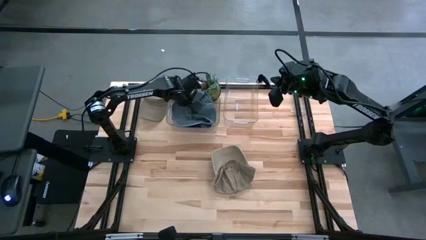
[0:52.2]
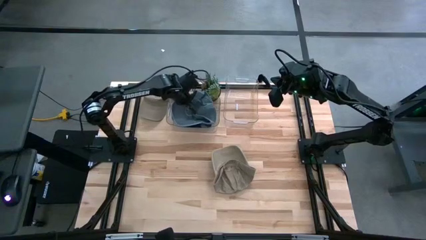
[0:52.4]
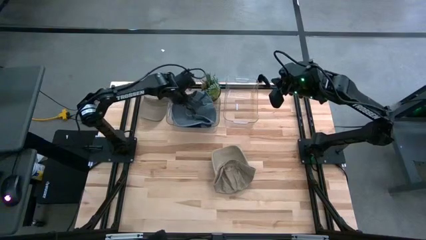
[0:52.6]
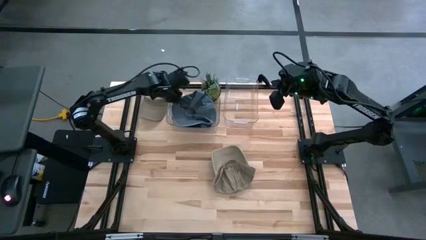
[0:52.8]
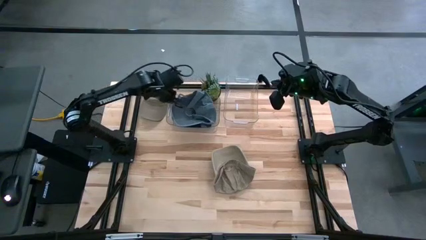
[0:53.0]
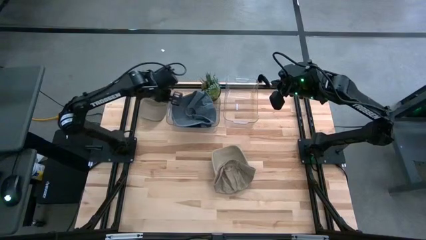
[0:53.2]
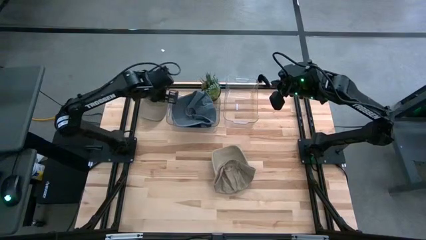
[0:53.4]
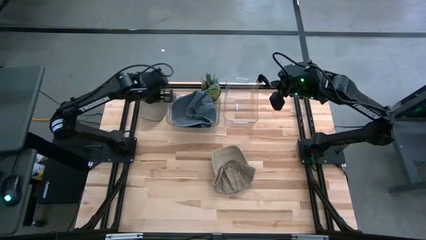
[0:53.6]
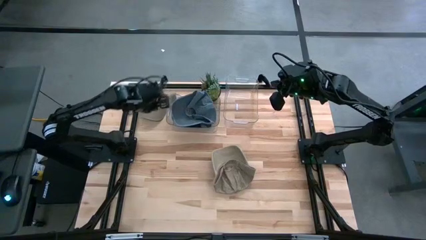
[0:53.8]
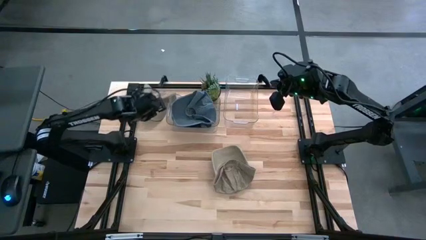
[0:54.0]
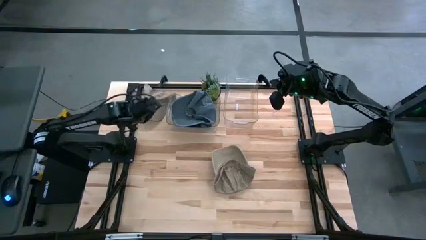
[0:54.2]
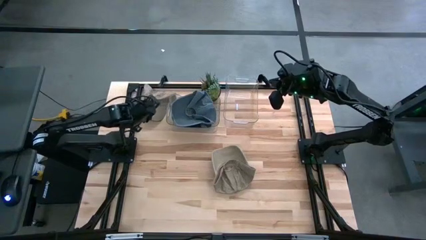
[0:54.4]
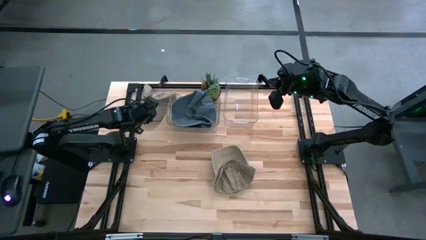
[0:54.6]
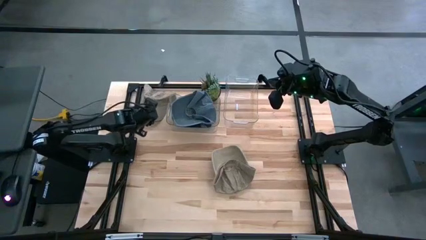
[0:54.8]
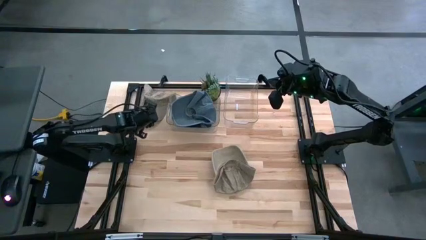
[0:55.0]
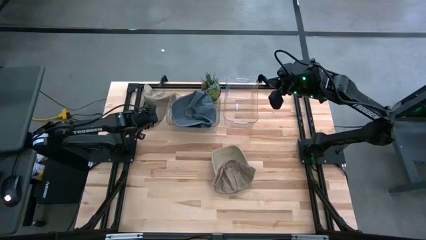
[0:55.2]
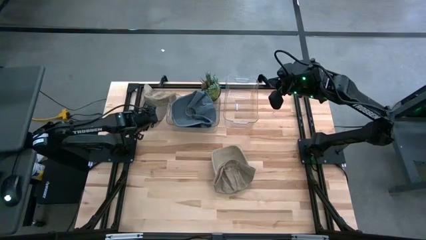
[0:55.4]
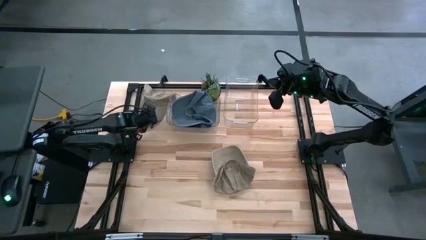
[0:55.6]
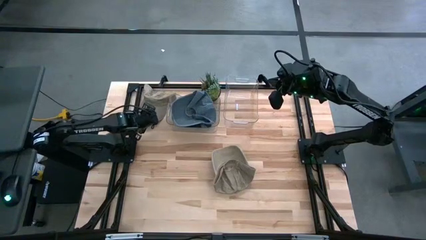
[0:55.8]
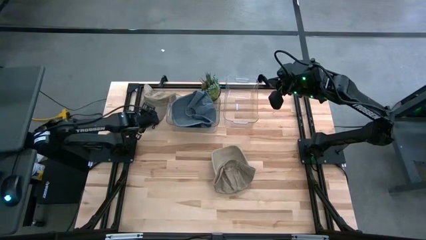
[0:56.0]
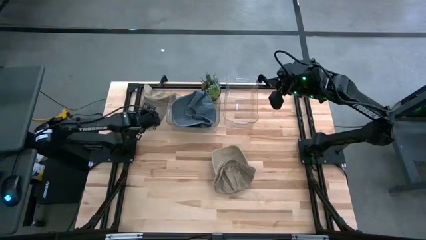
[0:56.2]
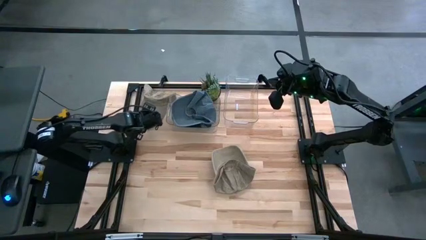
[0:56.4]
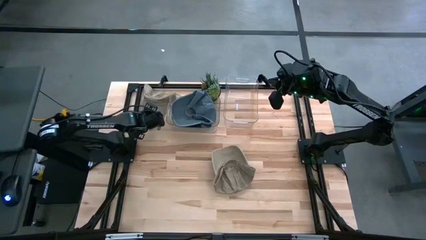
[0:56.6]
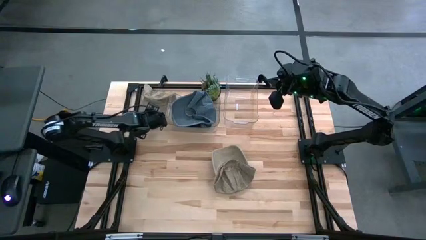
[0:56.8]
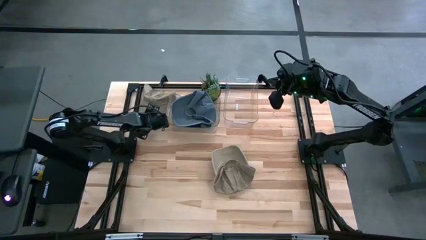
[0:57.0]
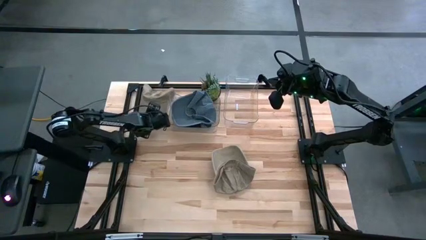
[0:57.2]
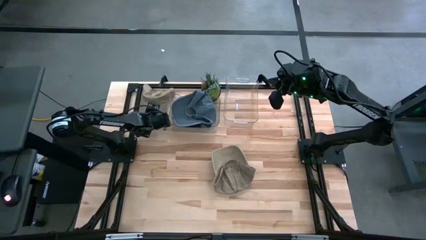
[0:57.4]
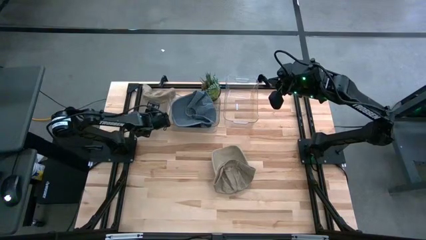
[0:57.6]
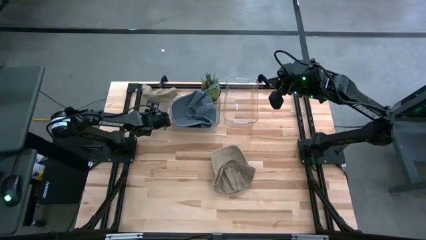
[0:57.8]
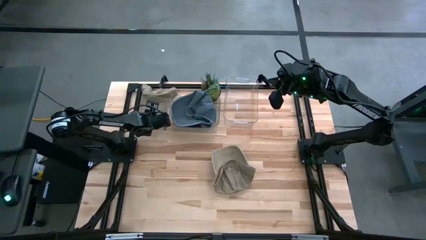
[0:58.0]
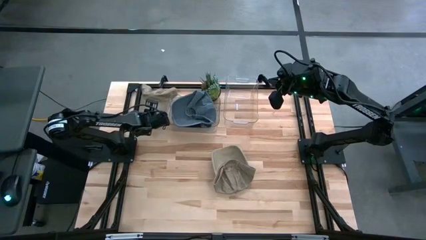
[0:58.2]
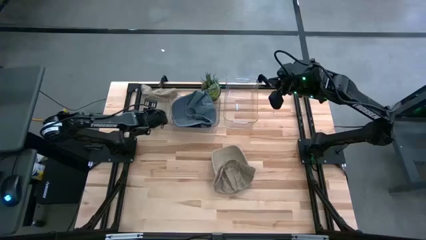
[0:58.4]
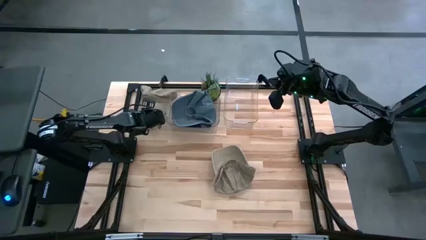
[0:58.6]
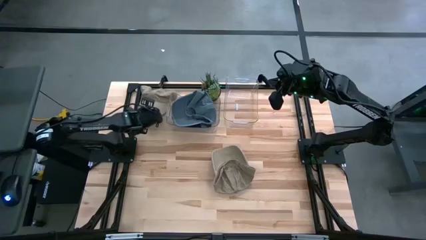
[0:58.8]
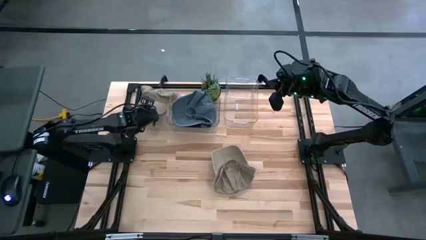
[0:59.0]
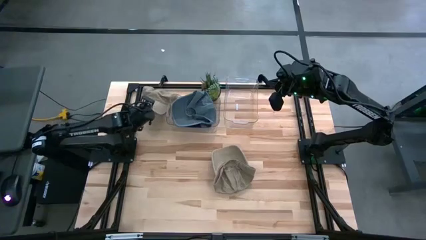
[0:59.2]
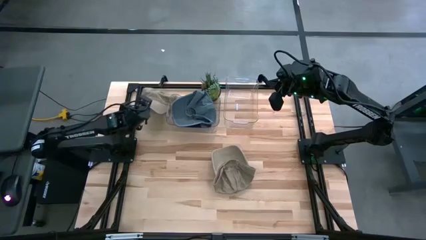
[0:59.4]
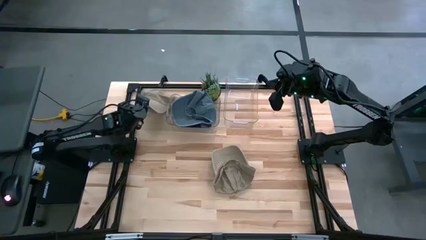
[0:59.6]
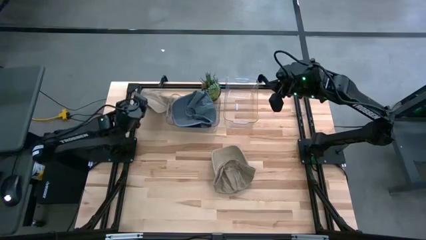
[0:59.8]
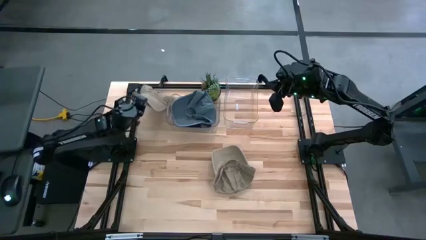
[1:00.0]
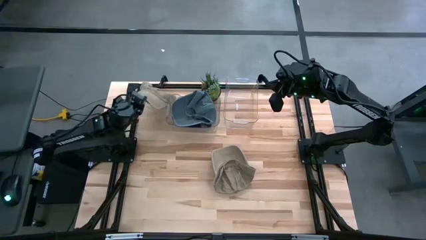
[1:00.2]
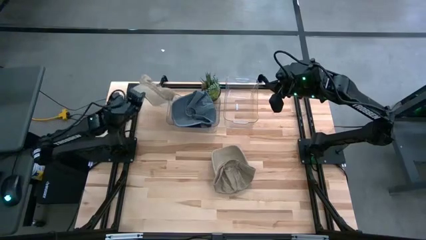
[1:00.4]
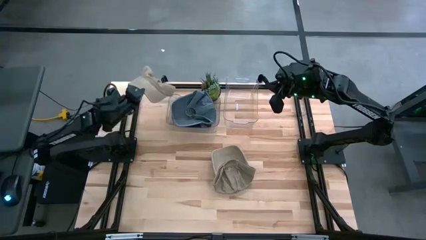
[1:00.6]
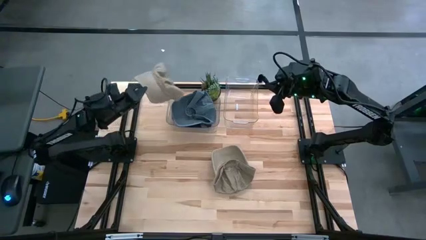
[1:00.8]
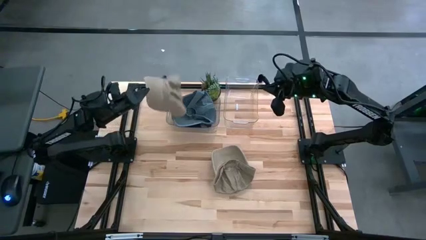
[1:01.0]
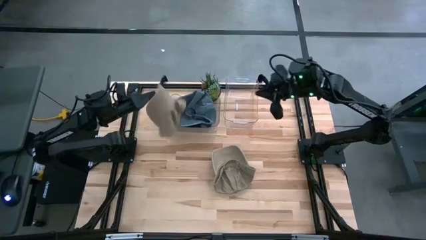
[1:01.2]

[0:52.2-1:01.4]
Task: Pick & Place hat
Put the top brown cap into the right transparent bin

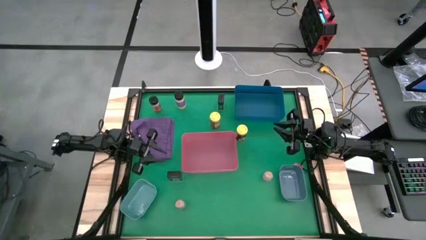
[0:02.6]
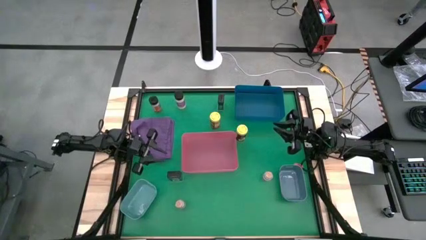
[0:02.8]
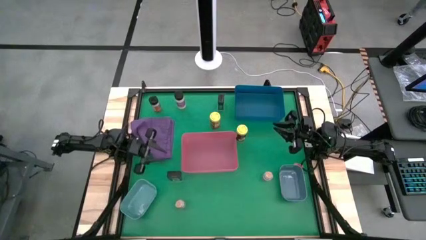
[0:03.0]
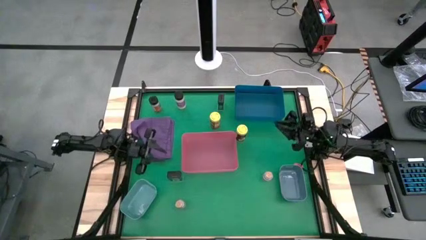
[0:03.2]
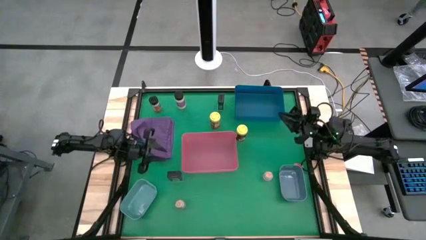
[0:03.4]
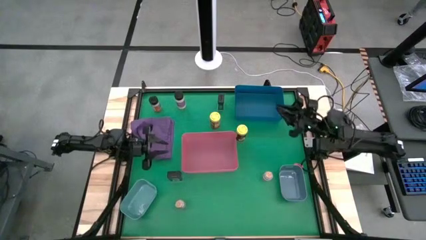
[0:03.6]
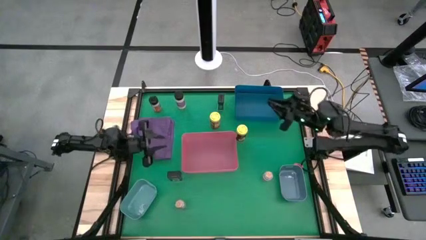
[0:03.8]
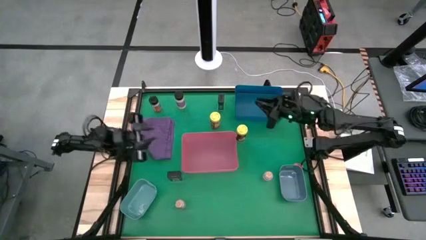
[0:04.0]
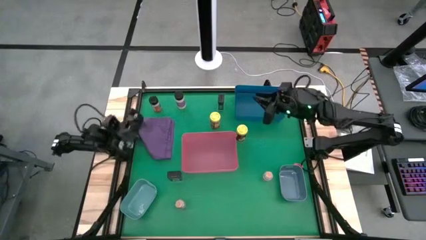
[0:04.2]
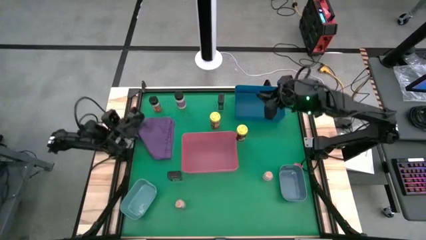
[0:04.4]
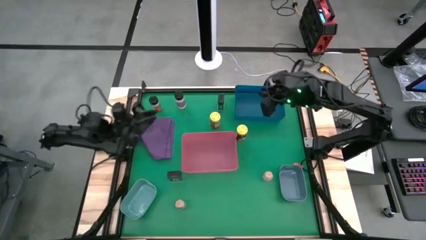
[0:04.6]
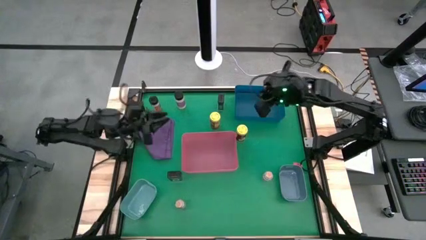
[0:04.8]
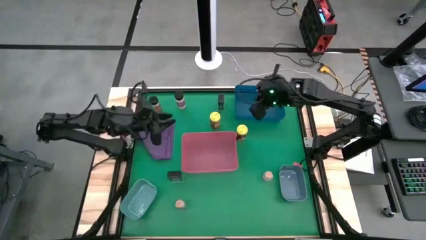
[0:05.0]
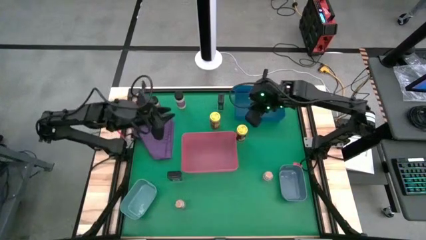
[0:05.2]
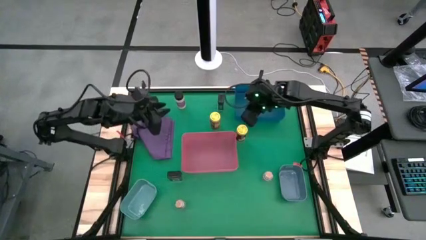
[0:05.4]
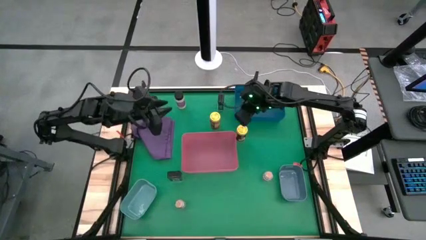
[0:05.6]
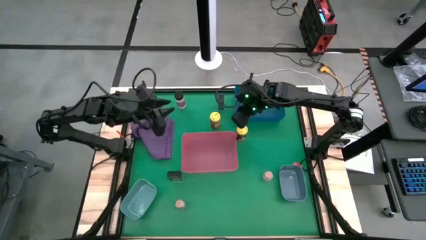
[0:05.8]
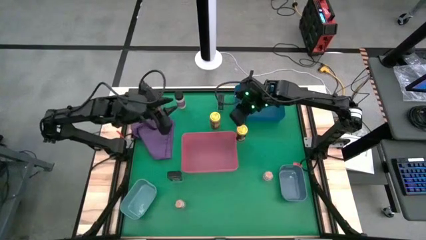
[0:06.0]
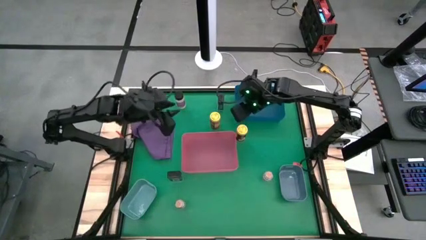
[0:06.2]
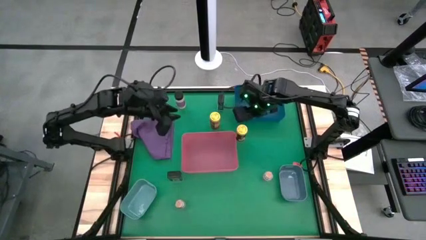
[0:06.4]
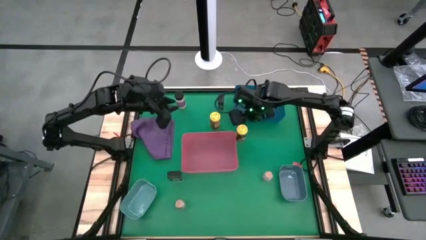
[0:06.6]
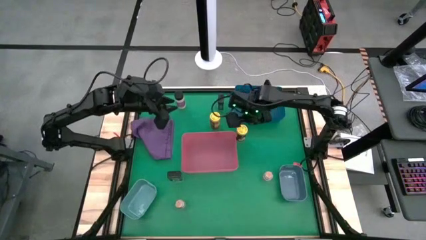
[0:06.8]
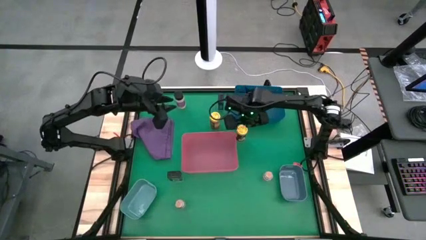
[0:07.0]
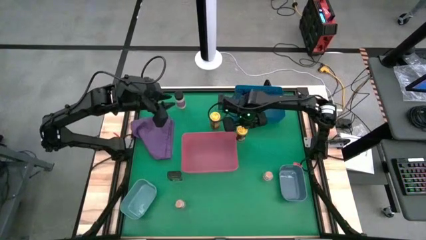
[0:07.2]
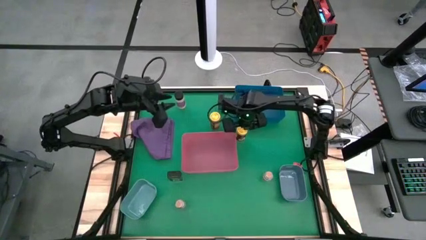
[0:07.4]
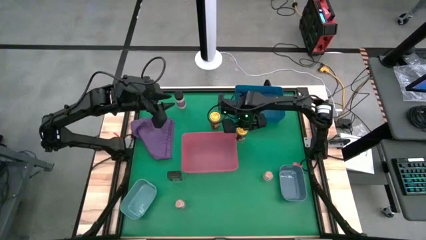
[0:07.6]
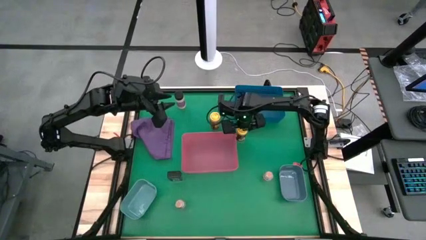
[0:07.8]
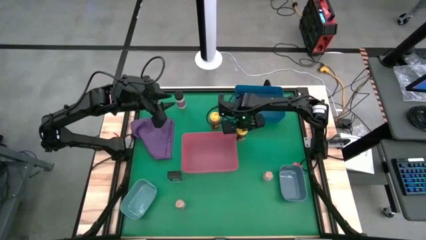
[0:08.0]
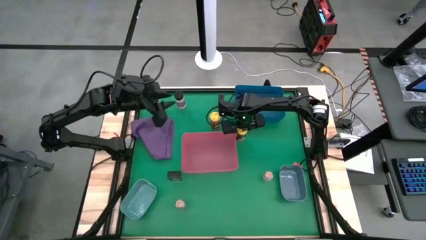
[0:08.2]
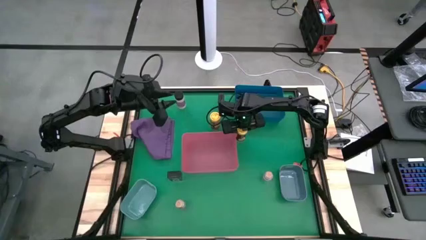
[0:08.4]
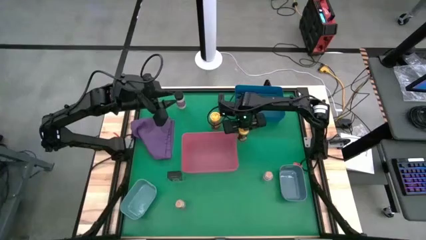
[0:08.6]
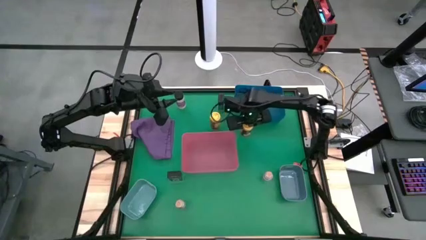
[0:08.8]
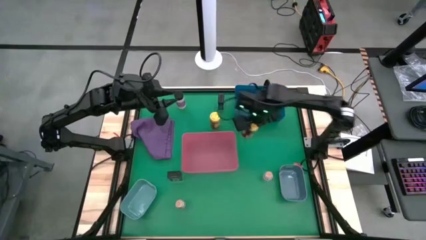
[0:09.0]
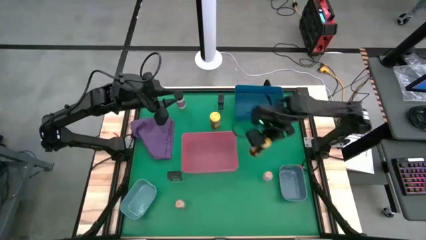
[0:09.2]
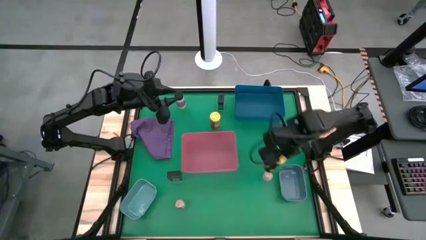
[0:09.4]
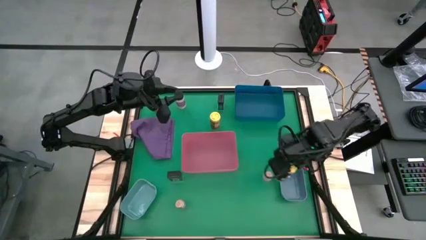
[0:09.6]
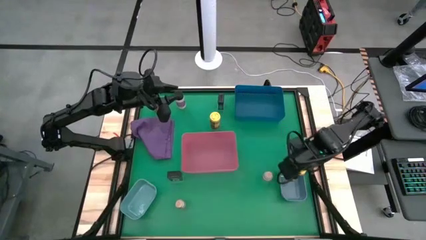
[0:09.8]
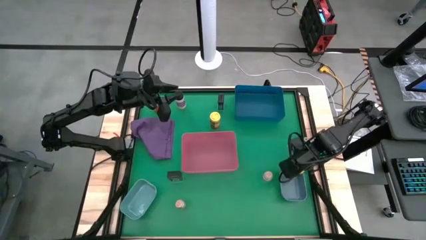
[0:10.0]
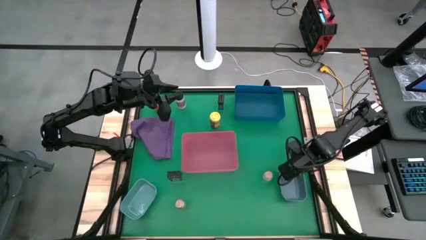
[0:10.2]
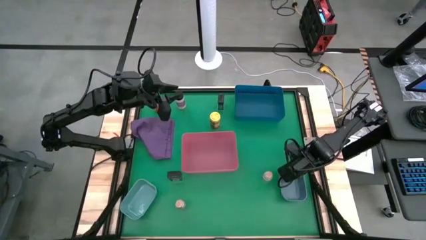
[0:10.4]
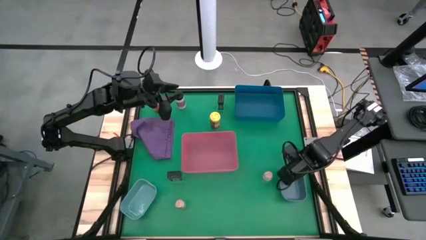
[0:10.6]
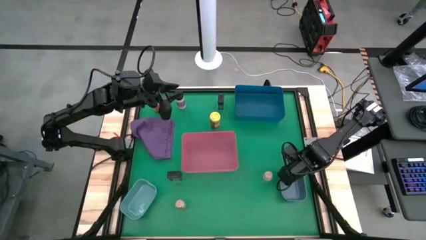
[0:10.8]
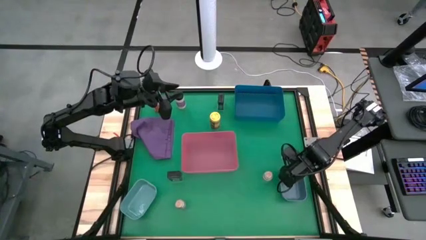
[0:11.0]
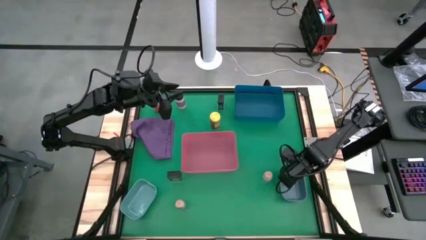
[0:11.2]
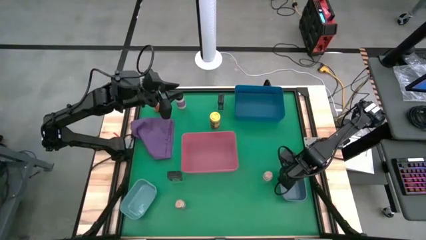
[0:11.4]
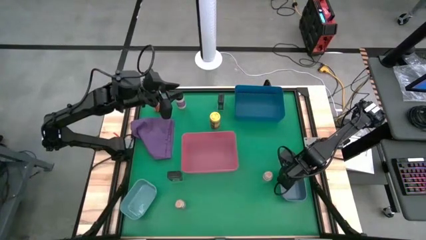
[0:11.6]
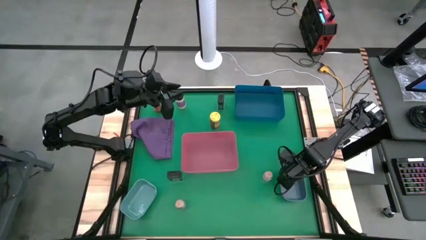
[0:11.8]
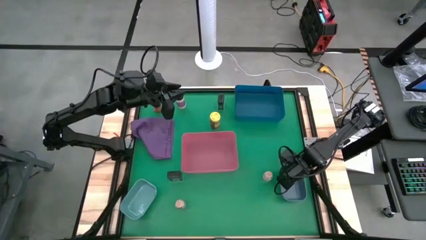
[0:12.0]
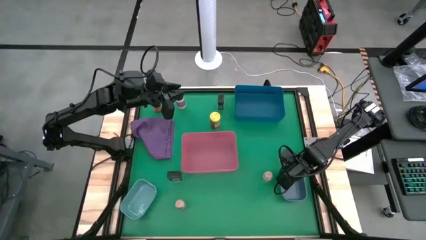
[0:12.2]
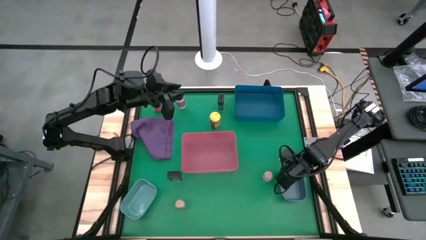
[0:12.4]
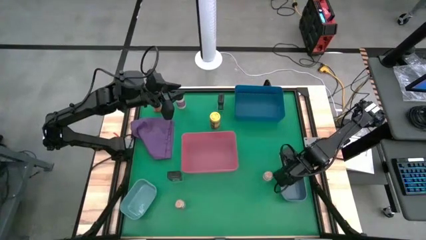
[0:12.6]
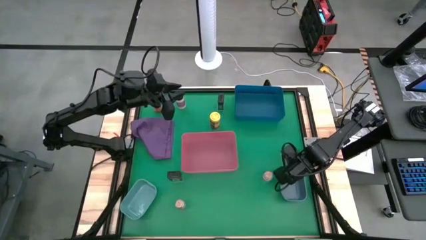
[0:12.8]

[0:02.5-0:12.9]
Task: Sort spices by type
Put the right yellow seasoning bottle into the gray bin
